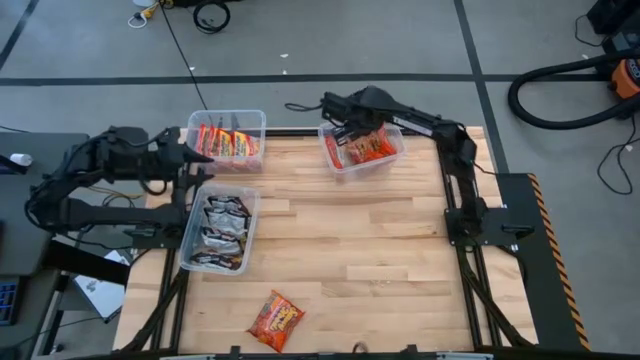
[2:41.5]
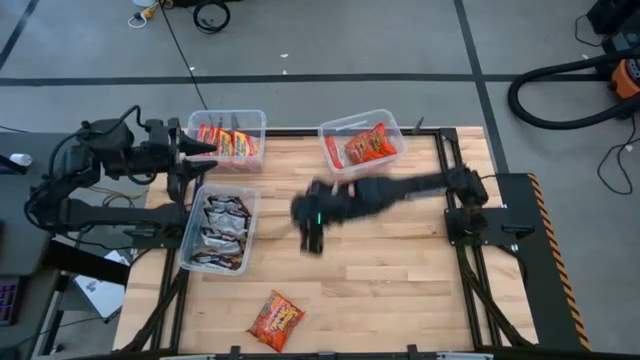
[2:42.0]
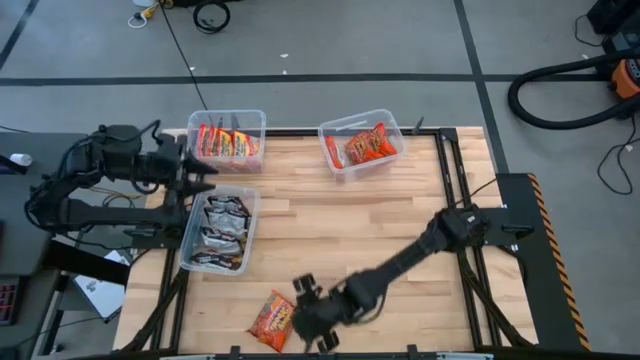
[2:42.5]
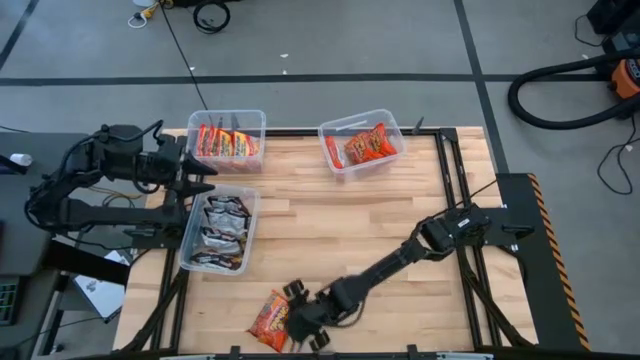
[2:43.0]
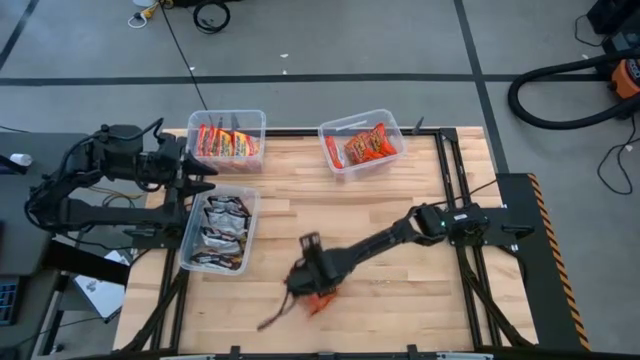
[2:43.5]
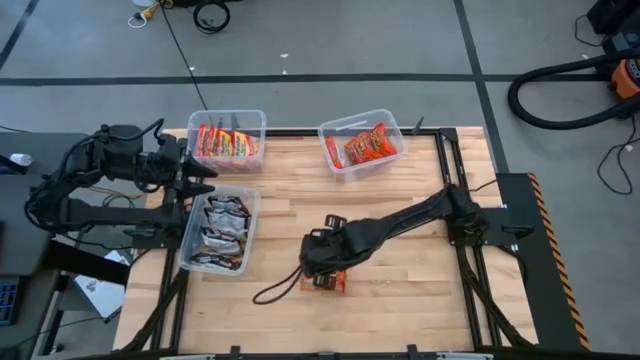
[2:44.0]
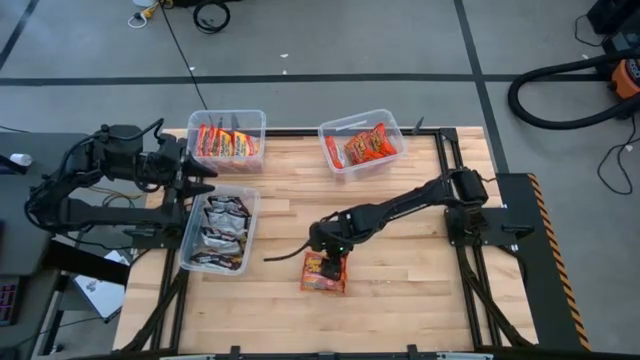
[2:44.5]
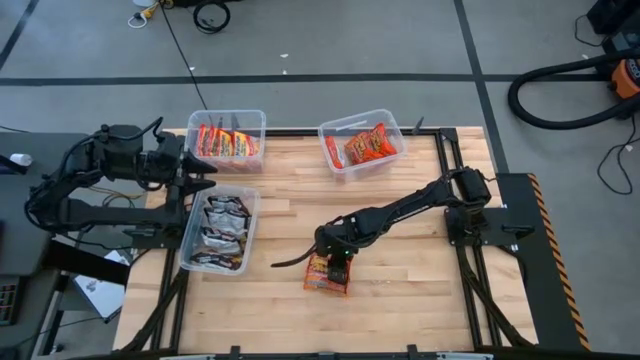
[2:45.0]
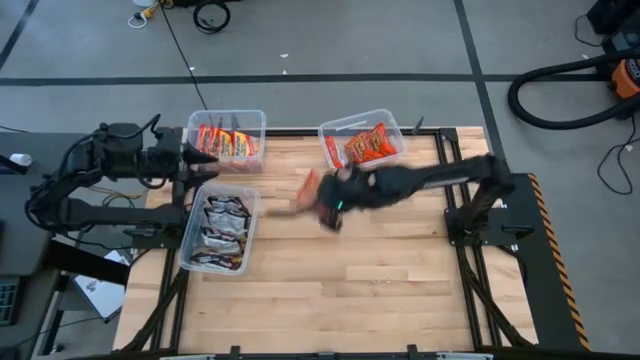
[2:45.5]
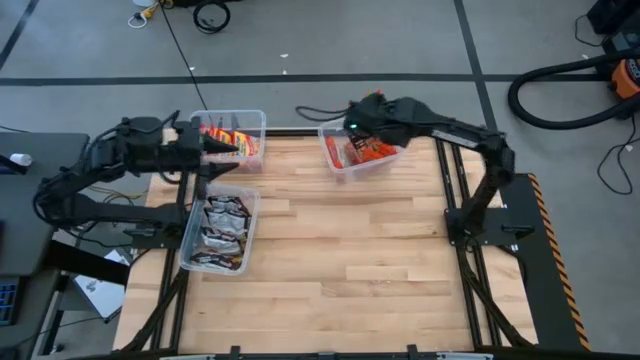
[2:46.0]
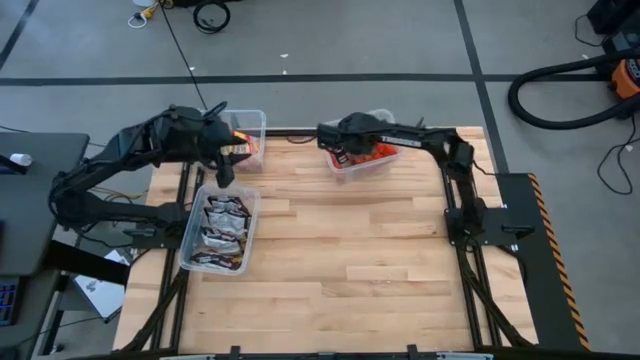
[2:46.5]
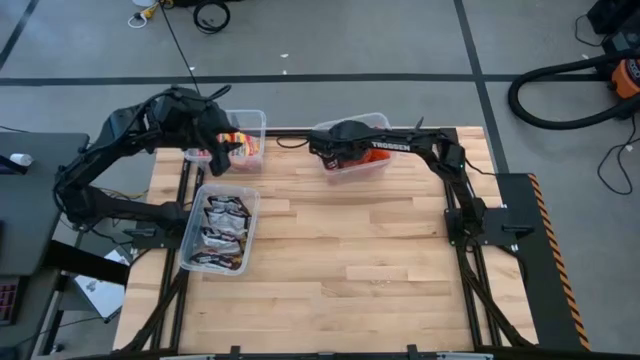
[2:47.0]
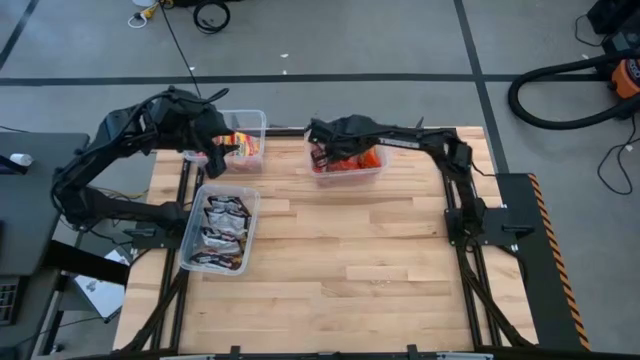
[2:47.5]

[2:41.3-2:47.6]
Task: Sort Maruchan noodles
Put the orange noodle pack into the top right transparent bin

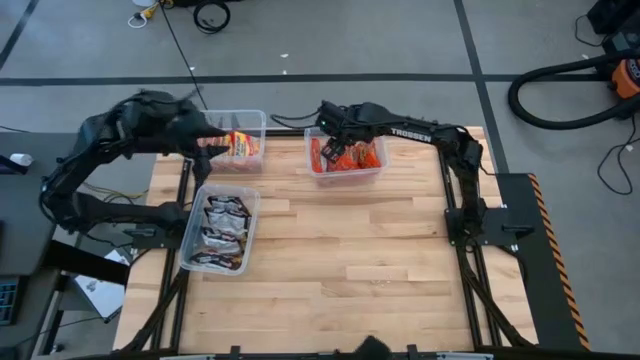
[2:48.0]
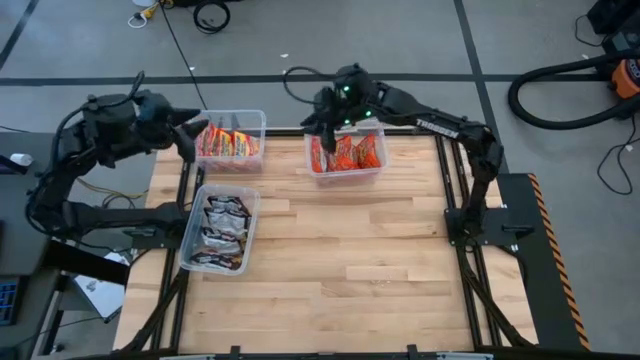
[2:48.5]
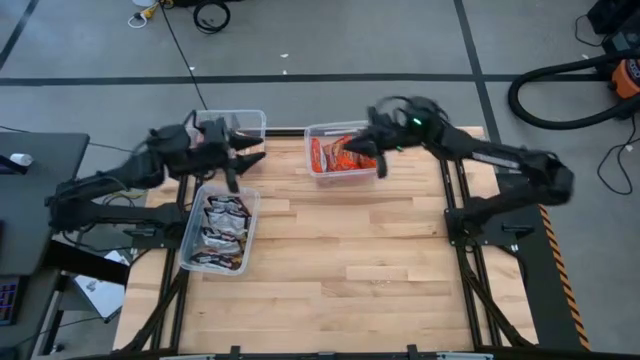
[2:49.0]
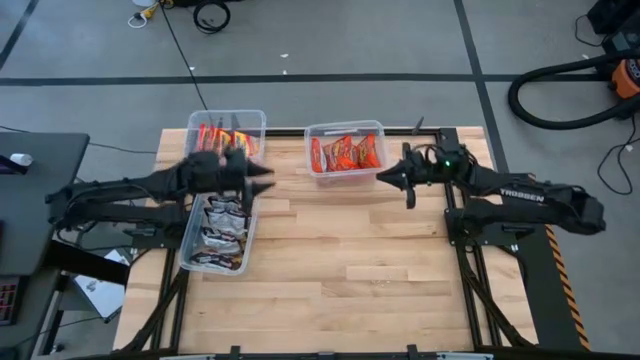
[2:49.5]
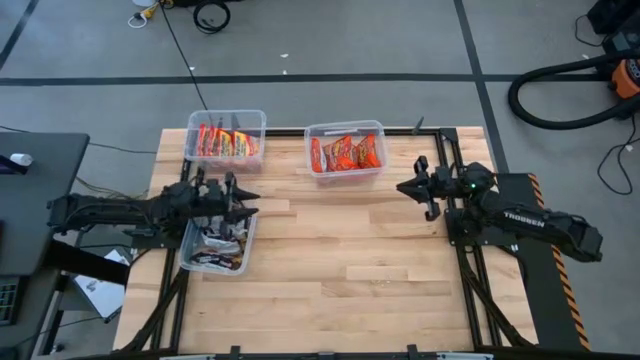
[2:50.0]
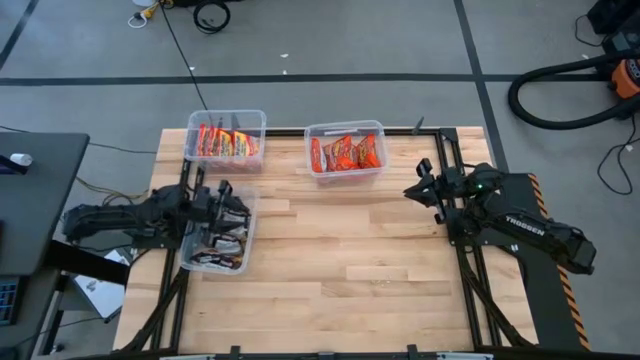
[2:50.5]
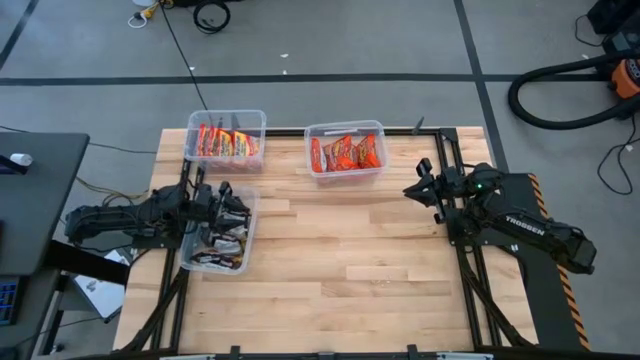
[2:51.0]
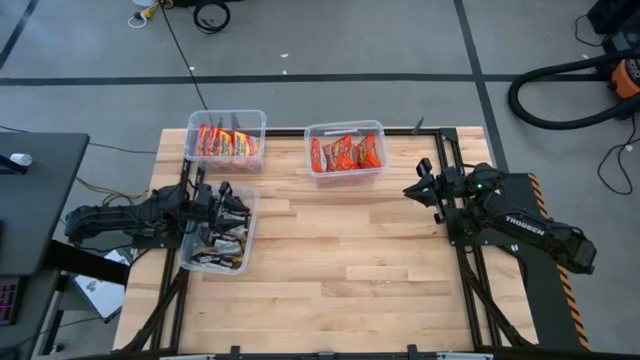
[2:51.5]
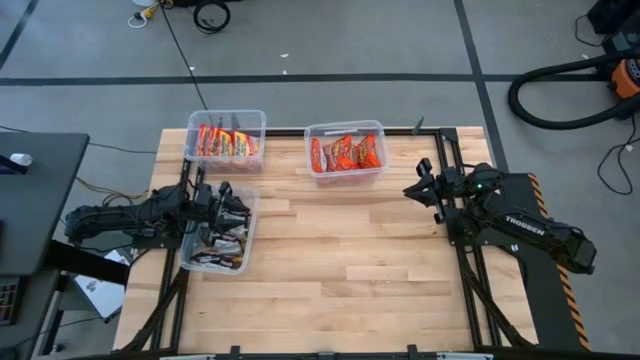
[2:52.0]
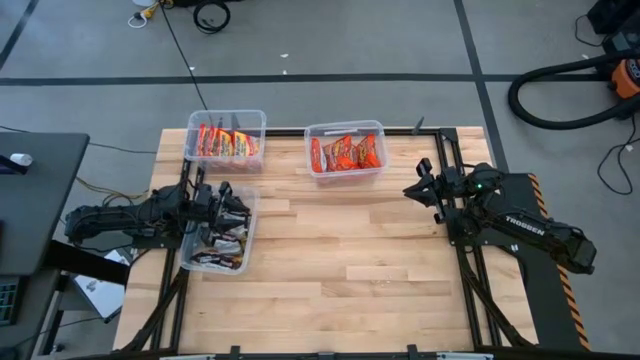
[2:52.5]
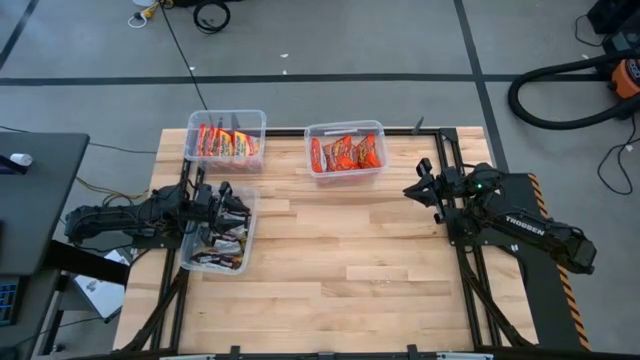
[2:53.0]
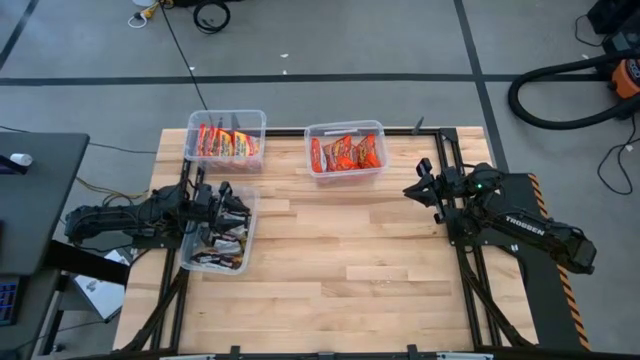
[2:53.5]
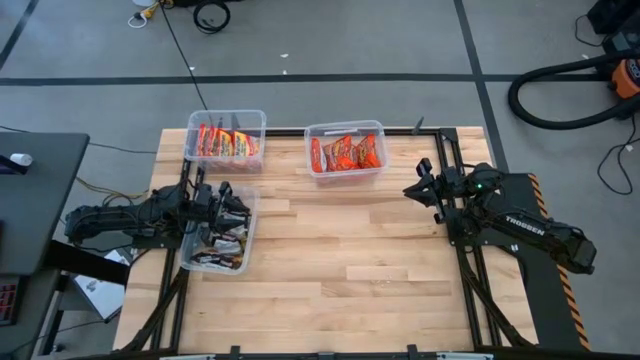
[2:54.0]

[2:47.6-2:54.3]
Return to Home Position

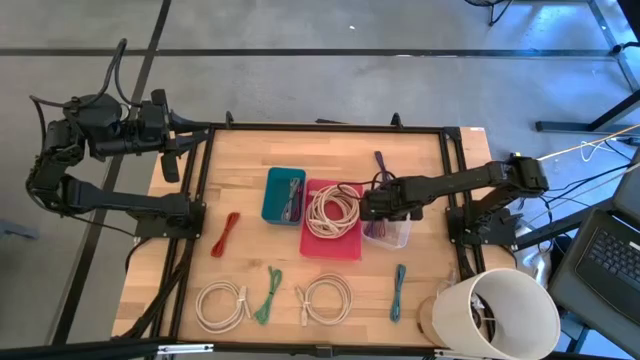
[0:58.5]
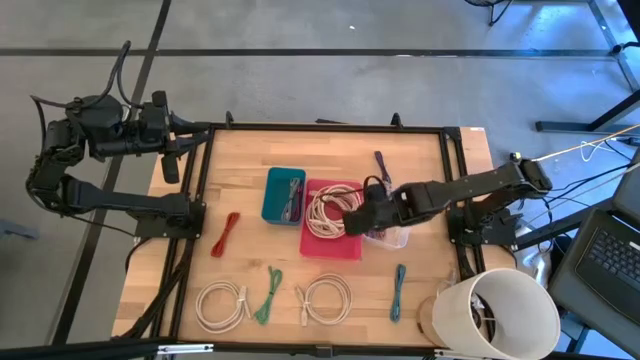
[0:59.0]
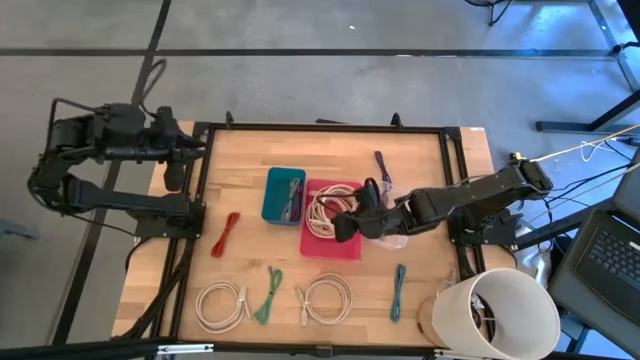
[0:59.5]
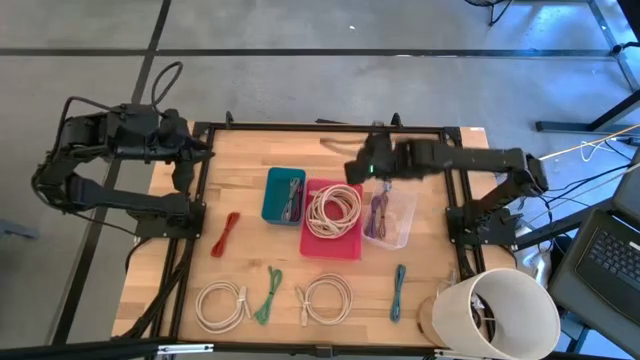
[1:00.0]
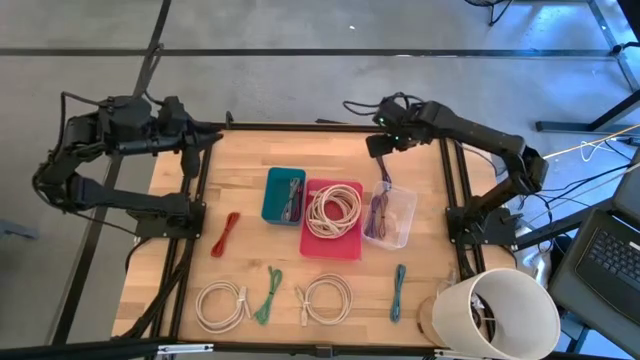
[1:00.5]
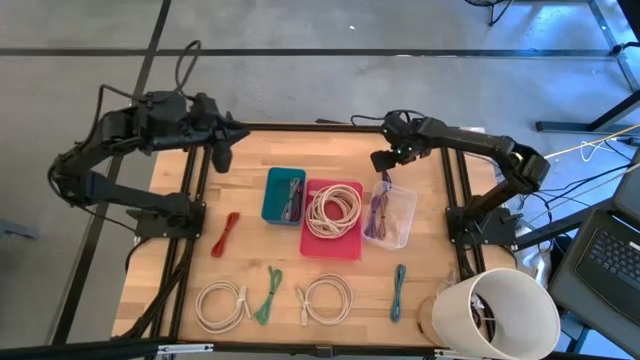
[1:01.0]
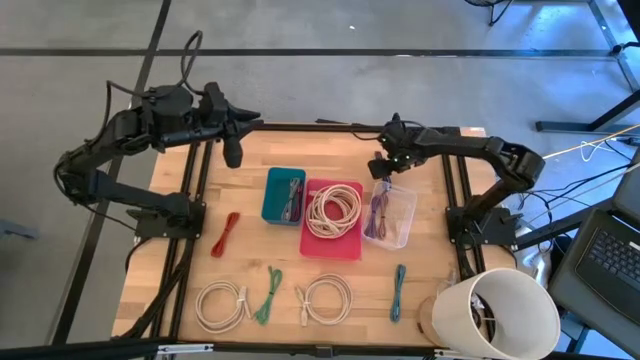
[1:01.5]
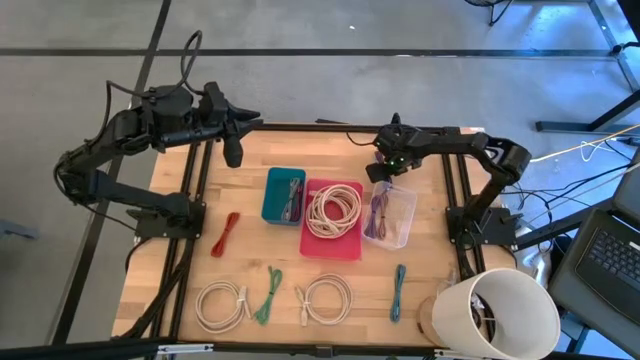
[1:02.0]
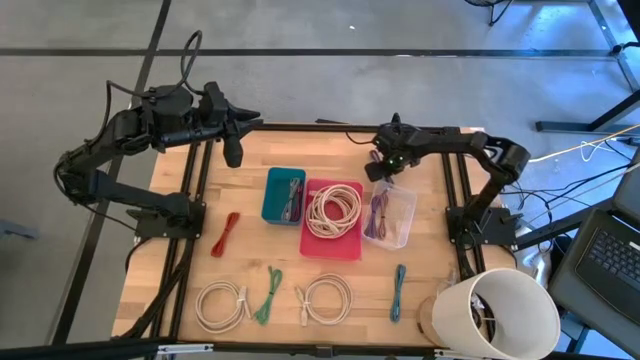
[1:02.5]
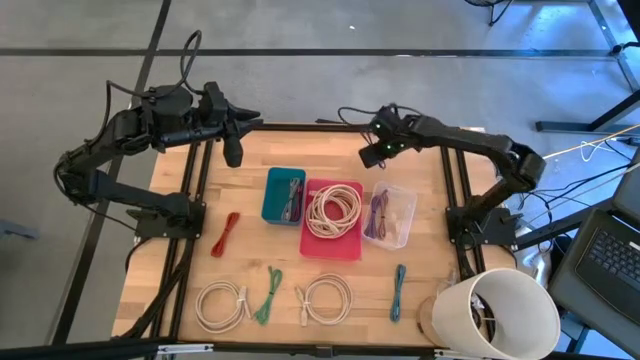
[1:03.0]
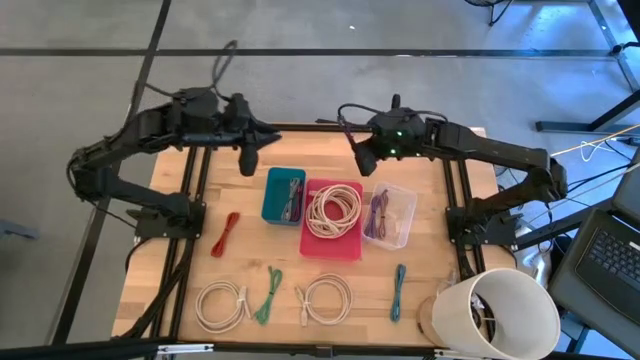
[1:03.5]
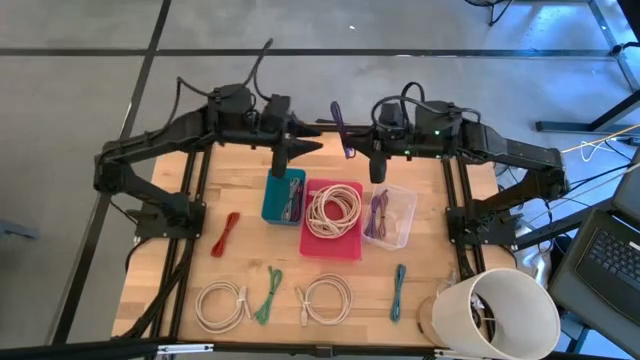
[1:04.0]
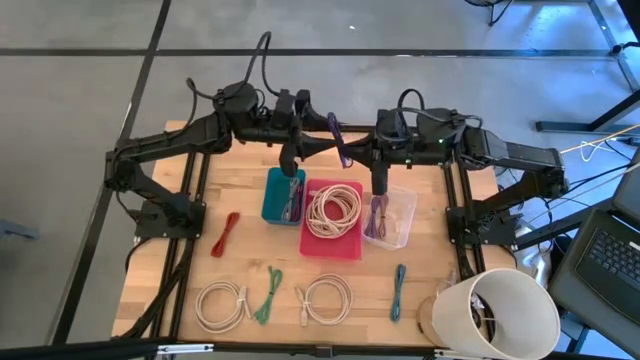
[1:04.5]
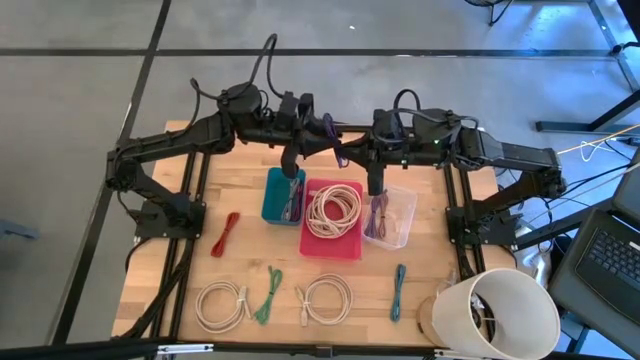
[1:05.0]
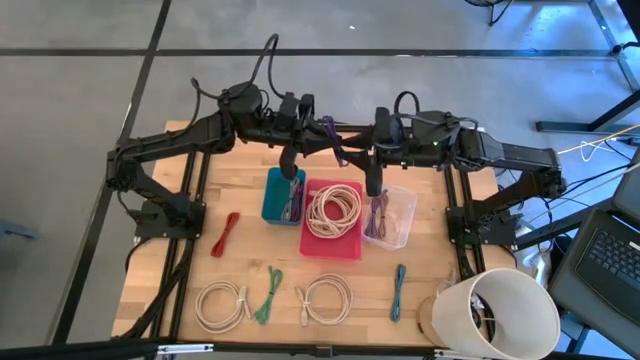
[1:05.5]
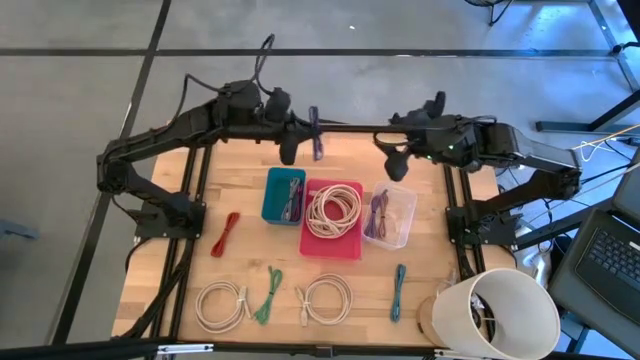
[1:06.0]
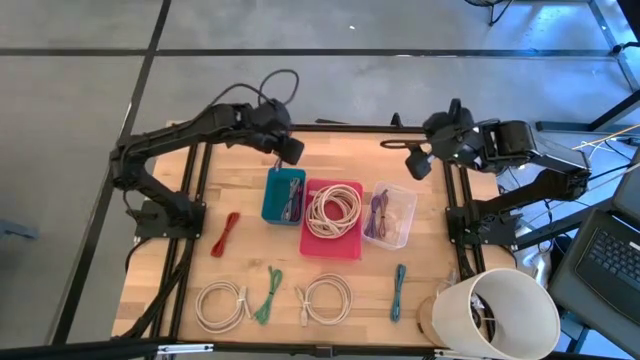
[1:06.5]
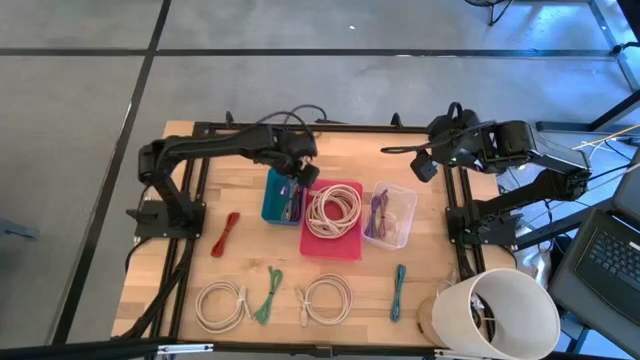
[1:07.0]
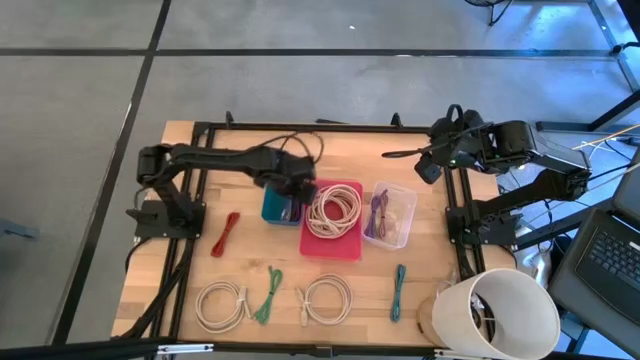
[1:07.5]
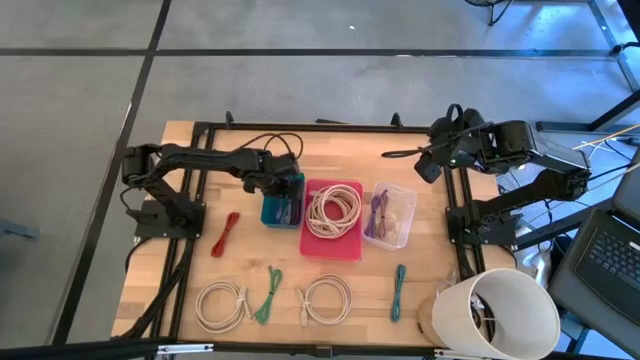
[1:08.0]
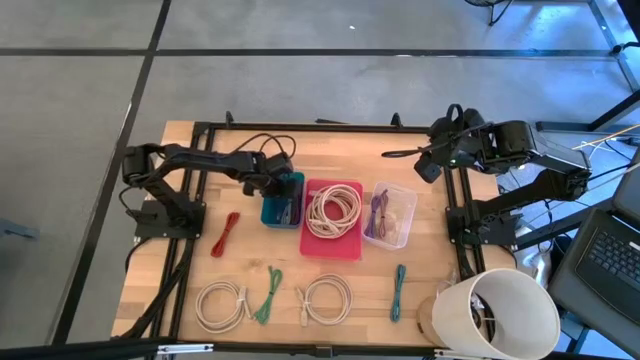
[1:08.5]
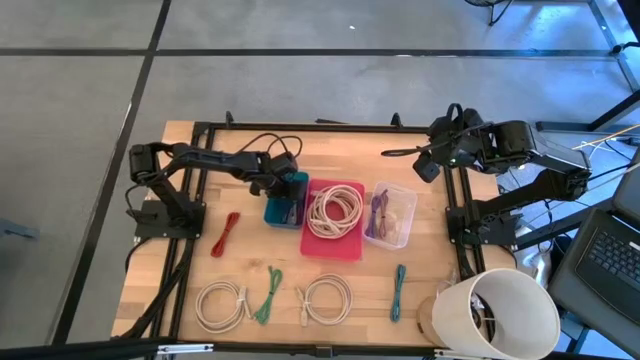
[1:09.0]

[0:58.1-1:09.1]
Task: Pick & Place USB Port
Put the purple and black charger cable into the sky blue bin
